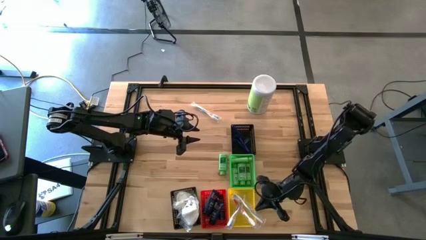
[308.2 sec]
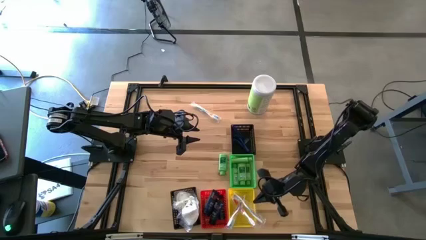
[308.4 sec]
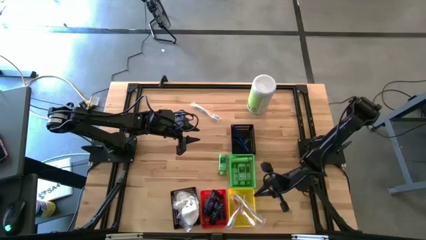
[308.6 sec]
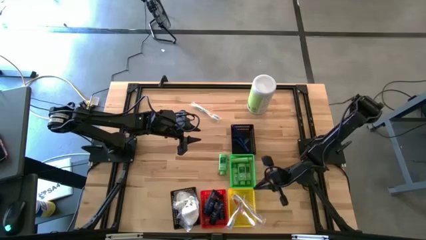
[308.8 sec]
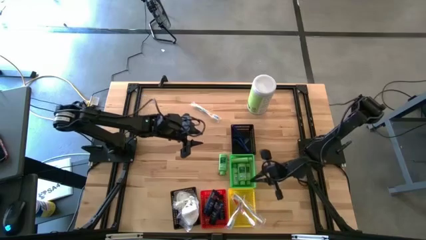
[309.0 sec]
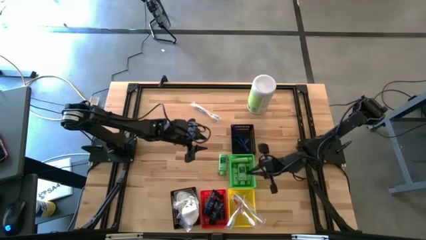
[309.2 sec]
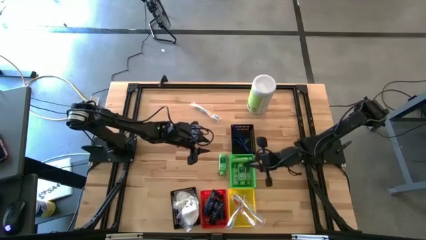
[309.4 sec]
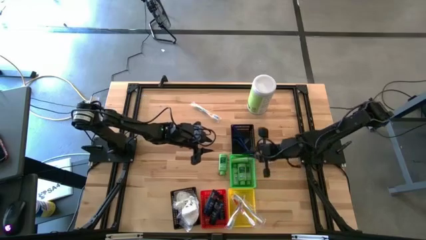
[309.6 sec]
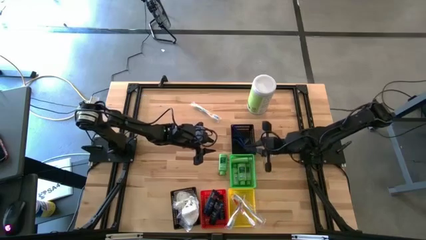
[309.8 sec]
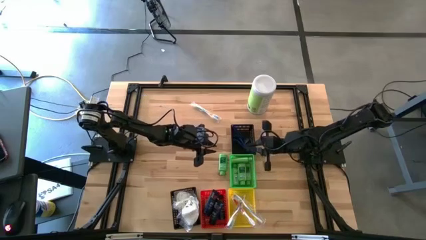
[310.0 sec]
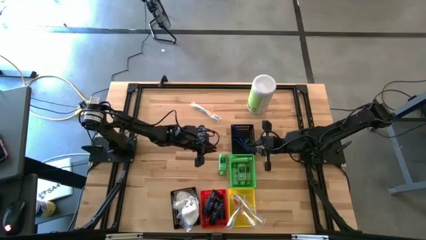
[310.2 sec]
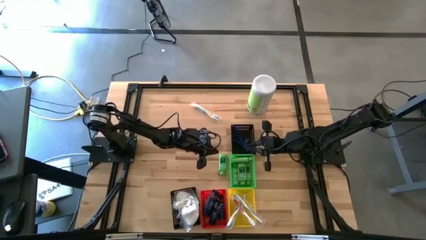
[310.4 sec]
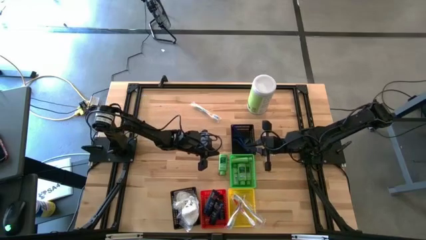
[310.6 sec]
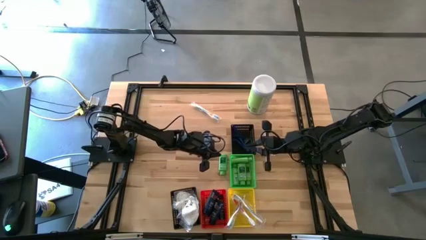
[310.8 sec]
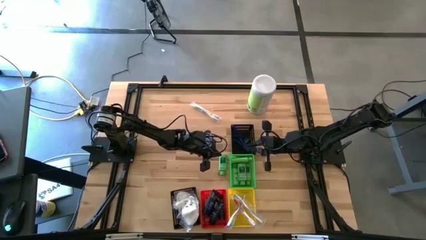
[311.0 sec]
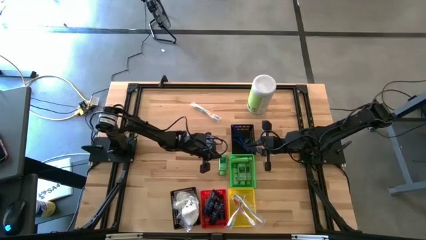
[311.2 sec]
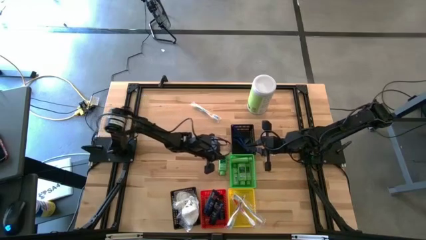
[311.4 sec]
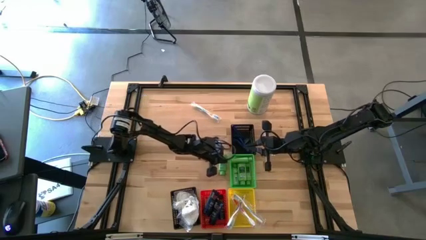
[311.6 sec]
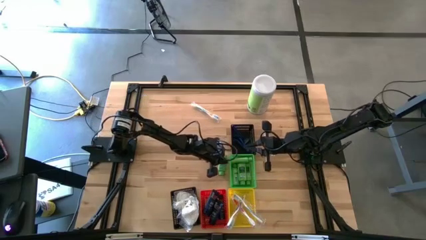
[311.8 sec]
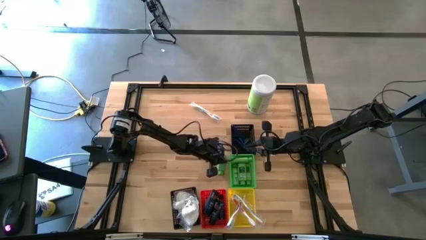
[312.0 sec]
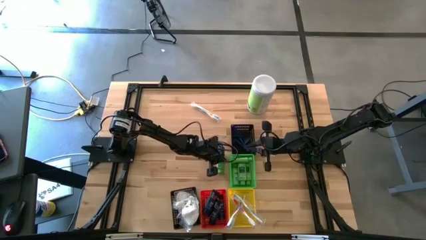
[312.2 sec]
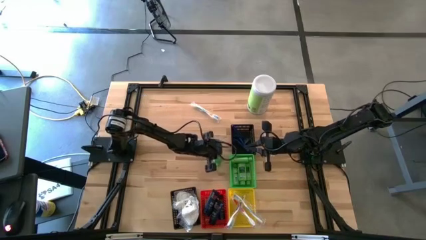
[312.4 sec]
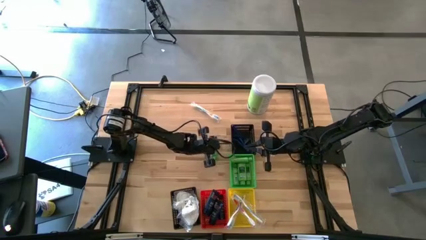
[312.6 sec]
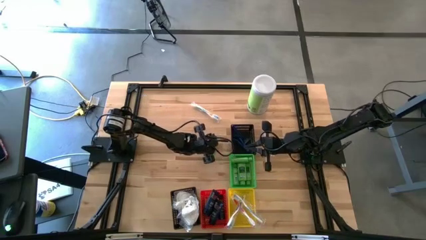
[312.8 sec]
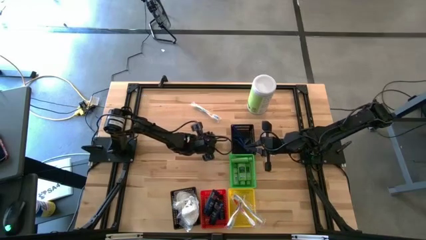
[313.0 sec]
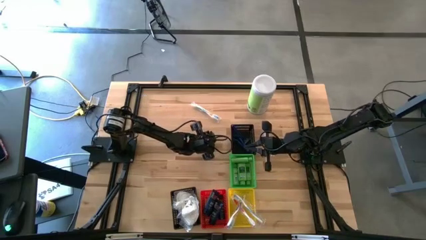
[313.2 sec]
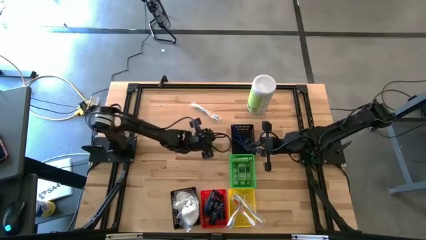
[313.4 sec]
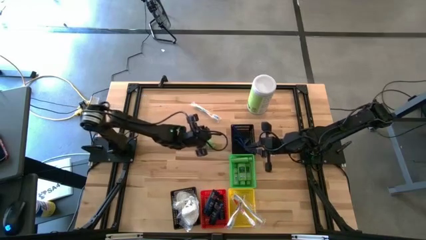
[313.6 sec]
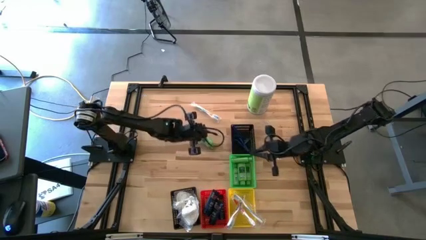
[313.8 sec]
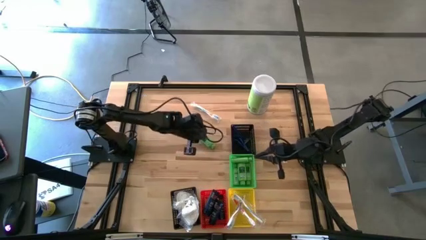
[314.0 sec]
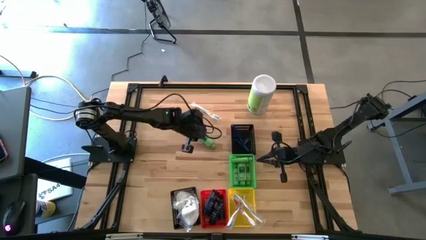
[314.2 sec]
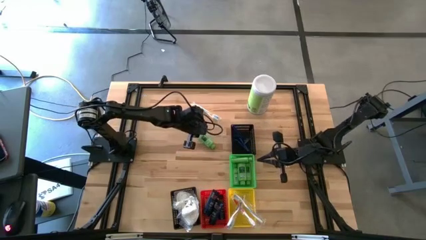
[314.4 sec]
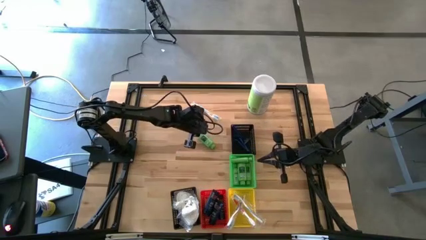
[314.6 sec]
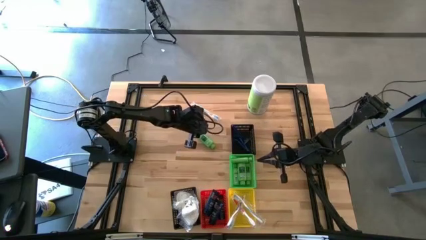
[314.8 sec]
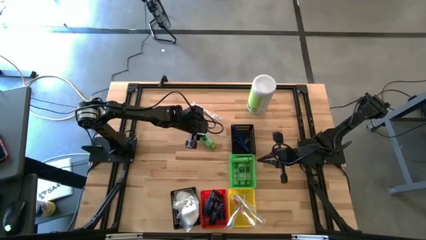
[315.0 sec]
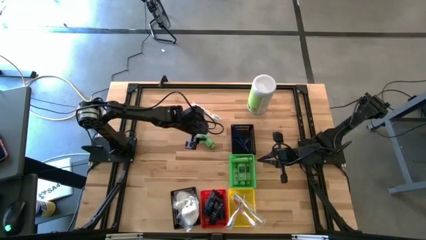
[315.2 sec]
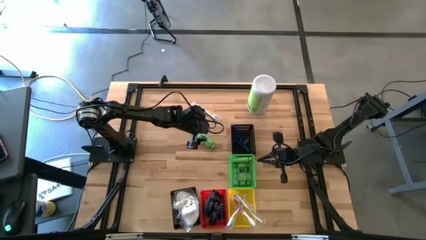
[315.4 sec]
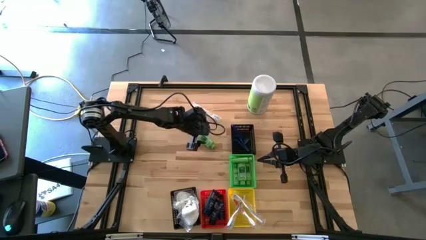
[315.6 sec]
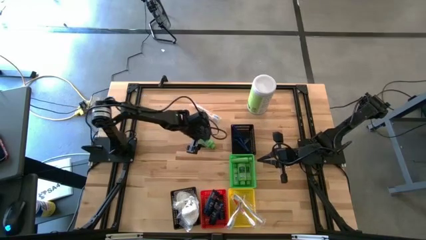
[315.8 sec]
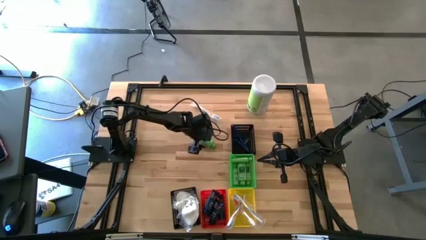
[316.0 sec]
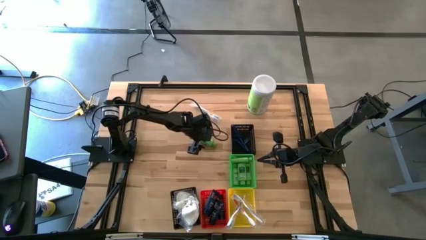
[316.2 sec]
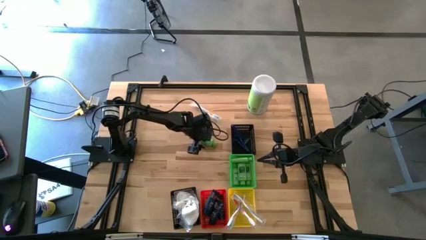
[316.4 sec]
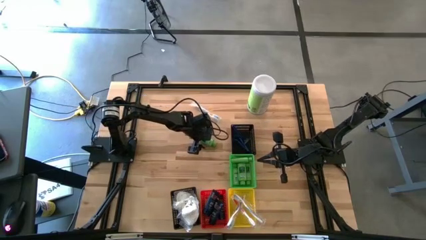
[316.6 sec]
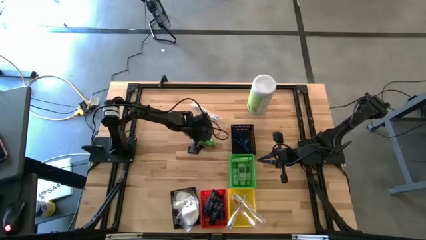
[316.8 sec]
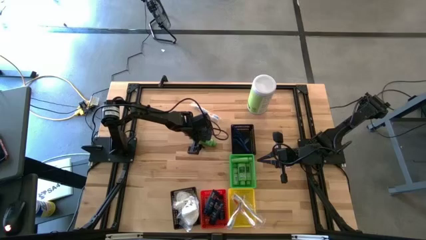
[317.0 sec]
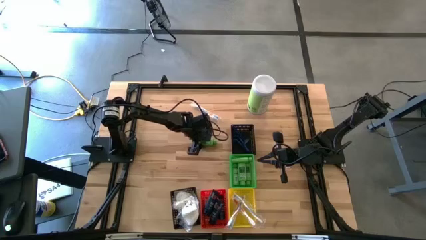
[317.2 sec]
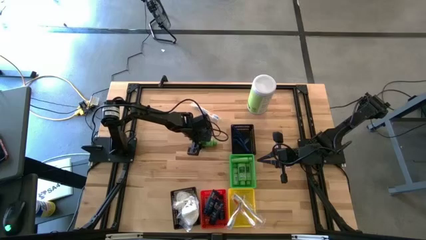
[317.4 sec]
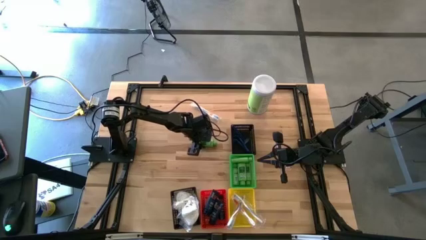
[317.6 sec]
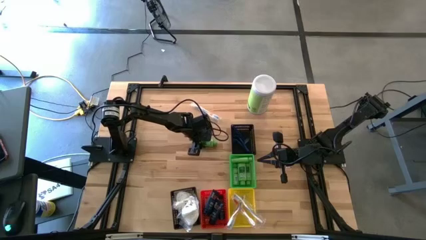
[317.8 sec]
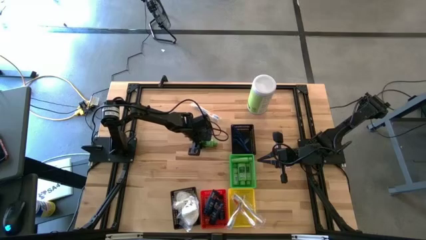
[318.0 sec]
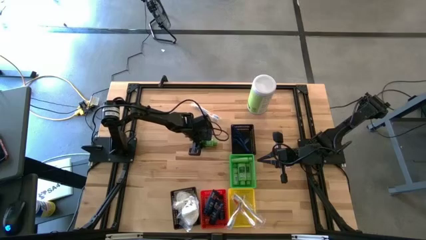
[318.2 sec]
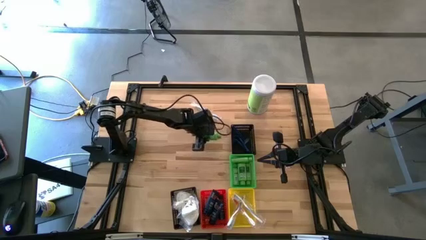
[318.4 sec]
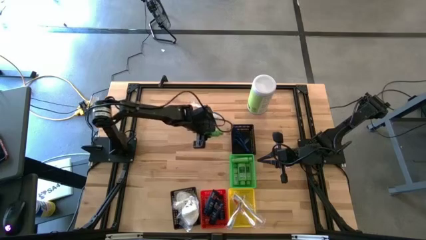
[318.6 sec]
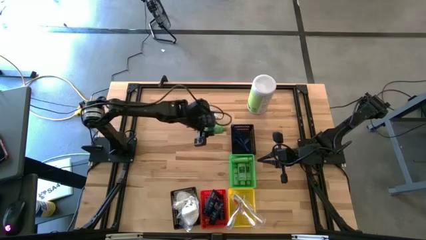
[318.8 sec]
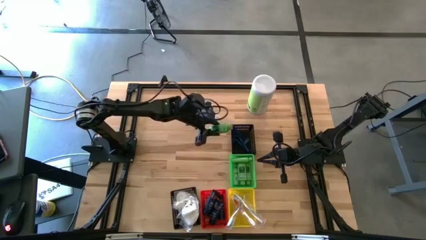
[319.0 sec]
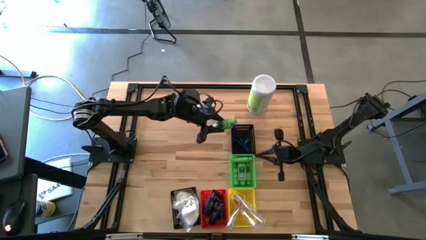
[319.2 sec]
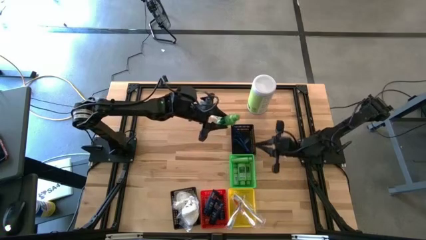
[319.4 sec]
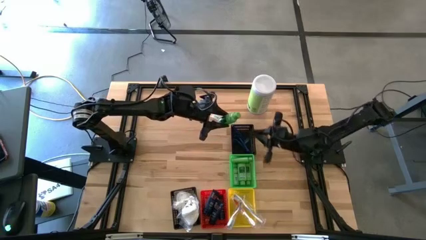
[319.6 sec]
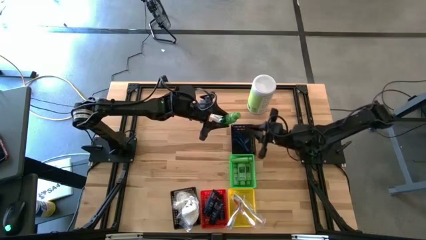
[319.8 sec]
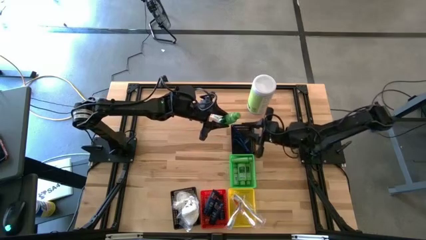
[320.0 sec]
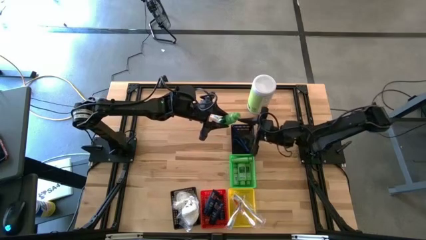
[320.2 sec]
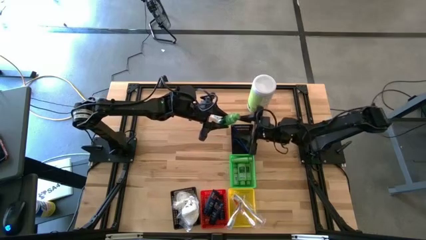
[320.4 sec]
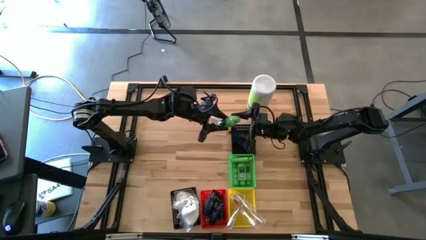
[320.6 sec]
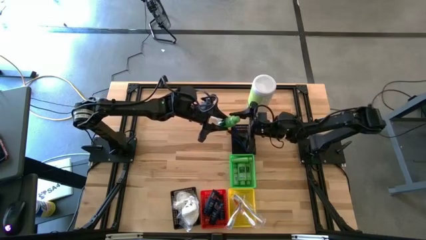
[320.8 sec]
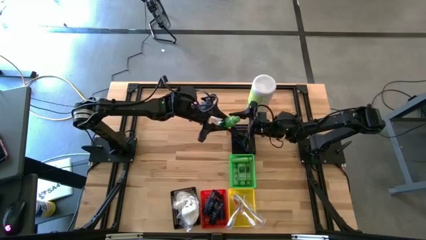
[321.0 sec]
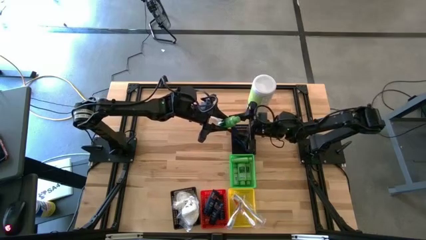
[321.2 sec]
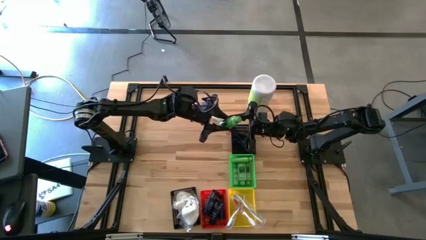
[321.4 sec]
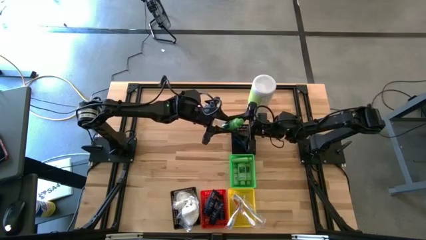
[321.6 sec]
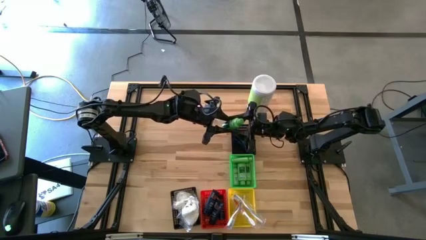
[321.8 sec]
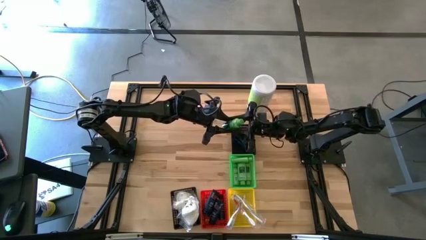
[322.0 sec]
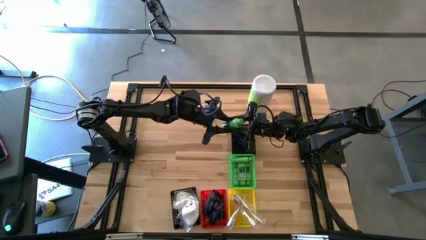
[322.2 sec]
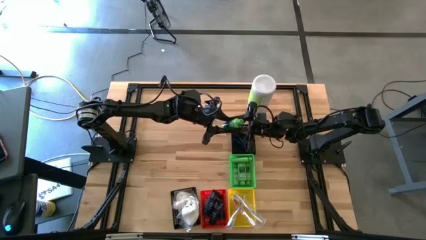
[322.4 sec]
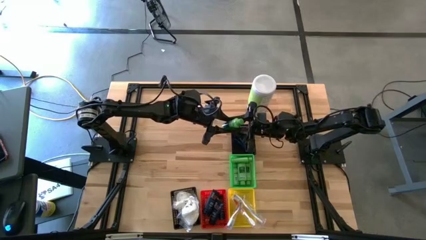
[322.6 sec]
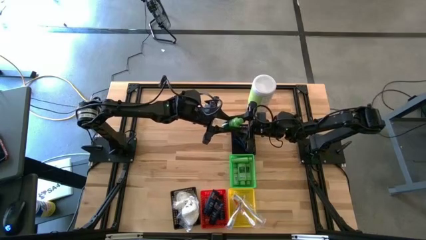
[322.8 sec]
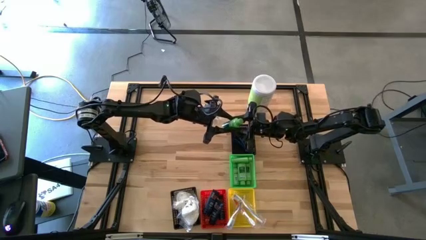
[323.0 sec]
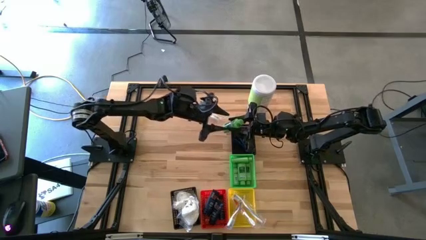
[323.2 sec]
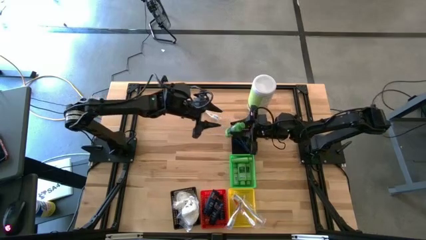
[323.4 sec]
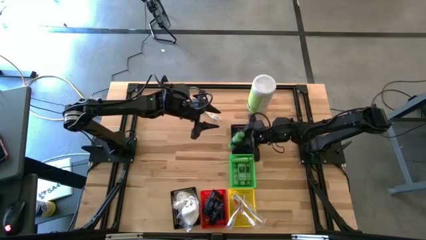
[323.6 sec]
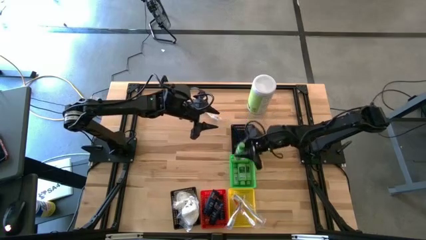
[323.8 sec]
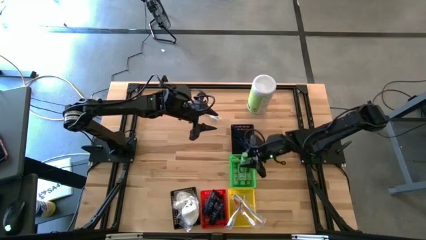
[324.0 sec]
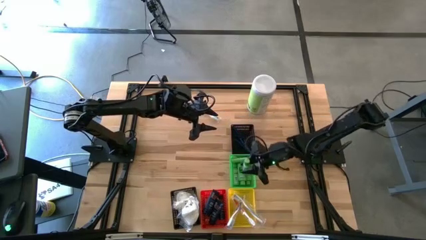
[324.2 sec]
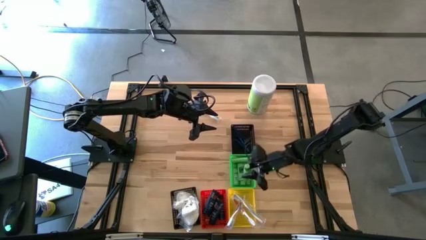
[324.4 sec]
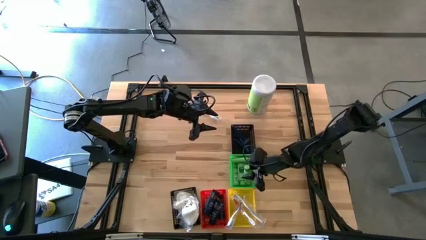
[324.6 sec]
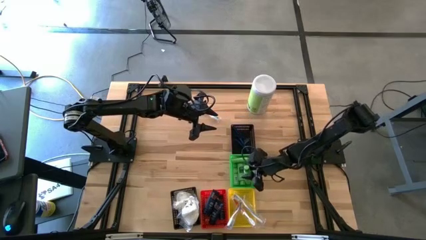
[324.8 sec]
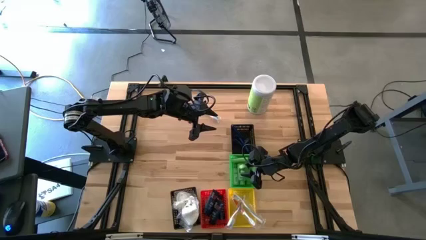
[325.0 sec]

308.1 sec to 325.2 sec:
Task: Pick & Place Travel size toiletries
Put the green shampoo into the green bin
